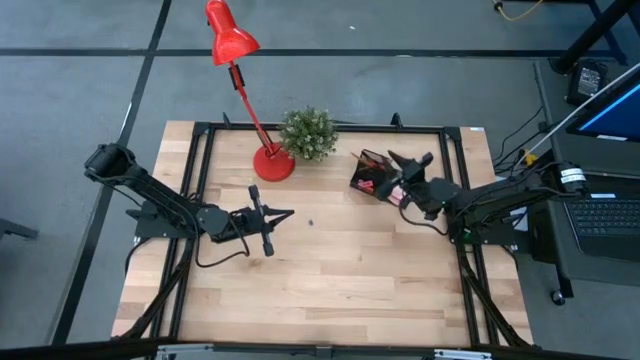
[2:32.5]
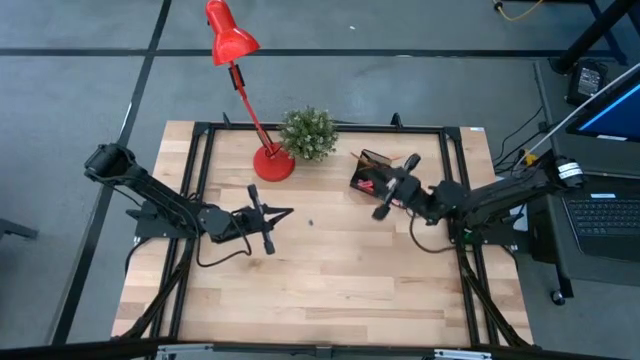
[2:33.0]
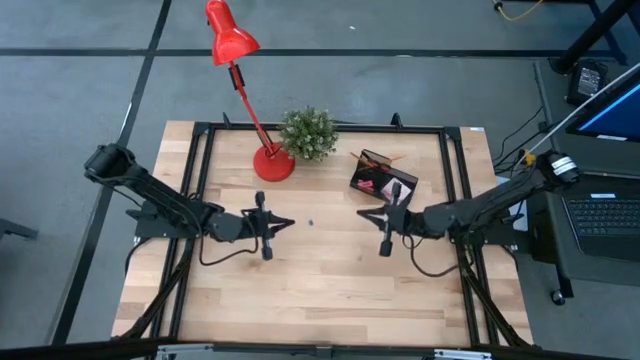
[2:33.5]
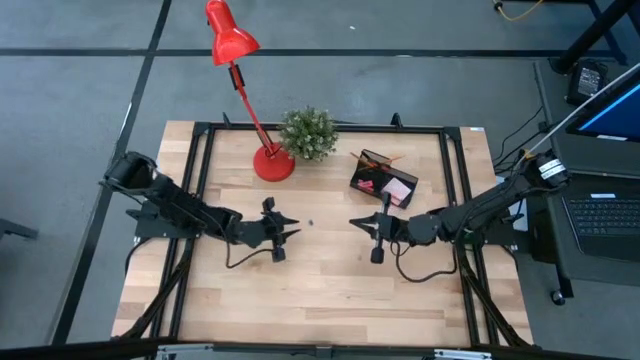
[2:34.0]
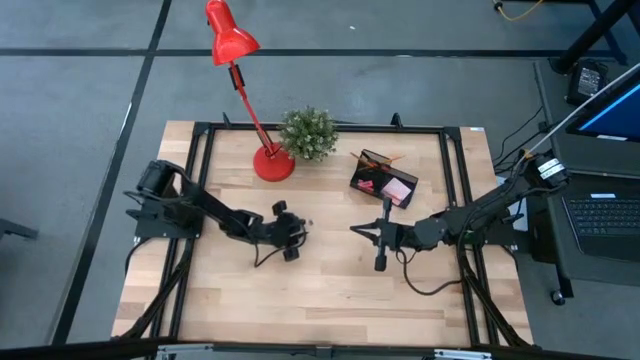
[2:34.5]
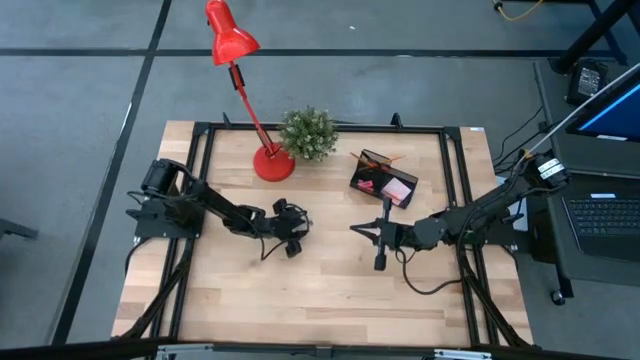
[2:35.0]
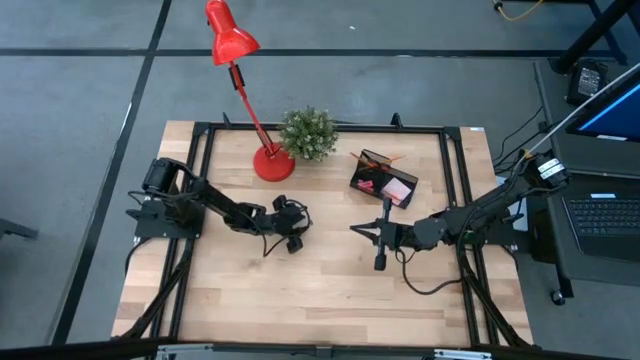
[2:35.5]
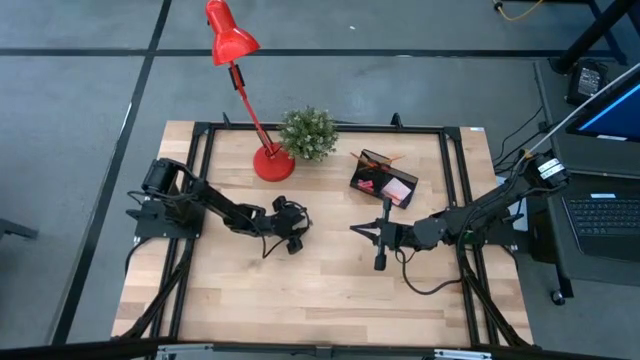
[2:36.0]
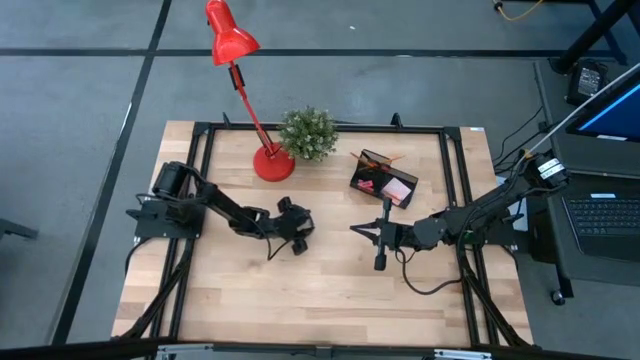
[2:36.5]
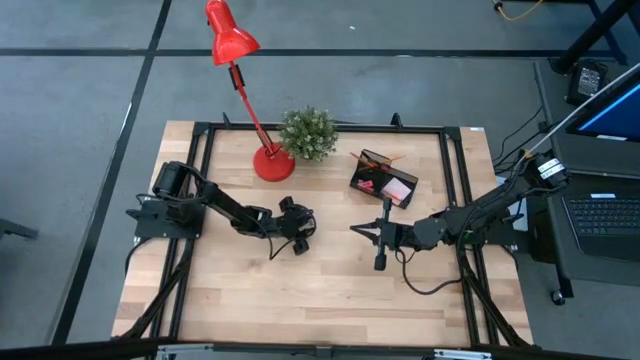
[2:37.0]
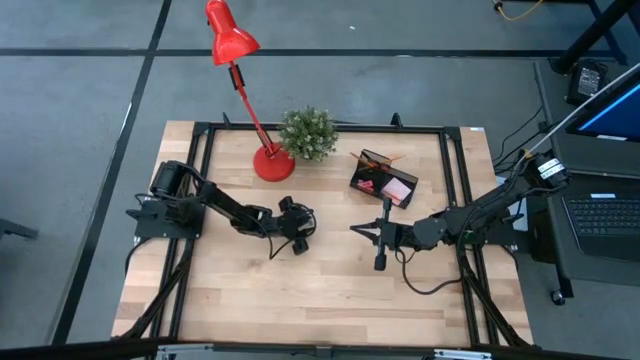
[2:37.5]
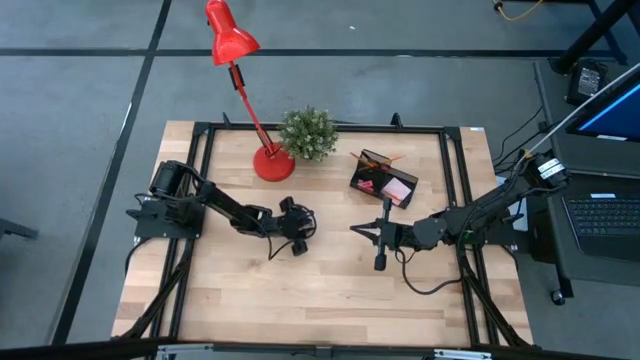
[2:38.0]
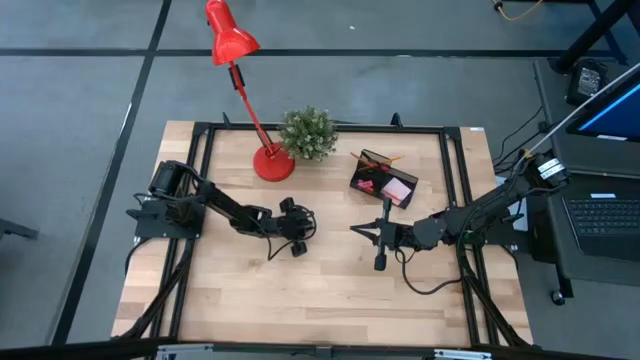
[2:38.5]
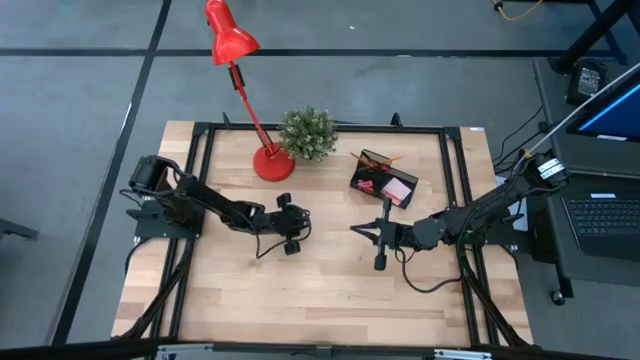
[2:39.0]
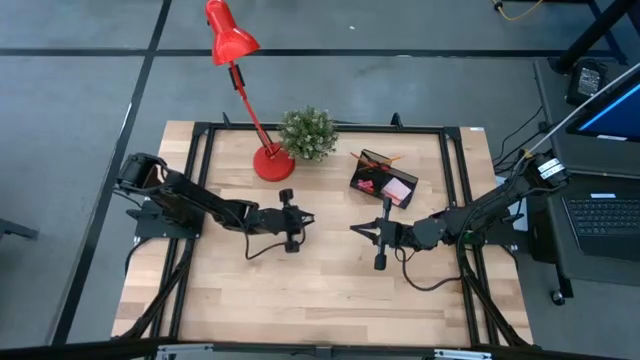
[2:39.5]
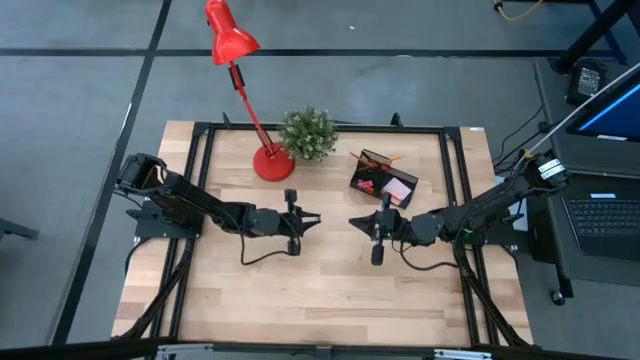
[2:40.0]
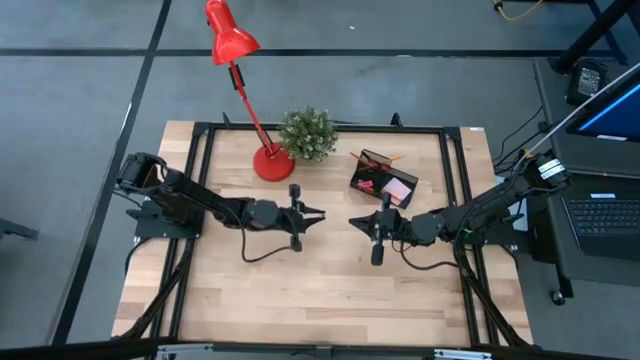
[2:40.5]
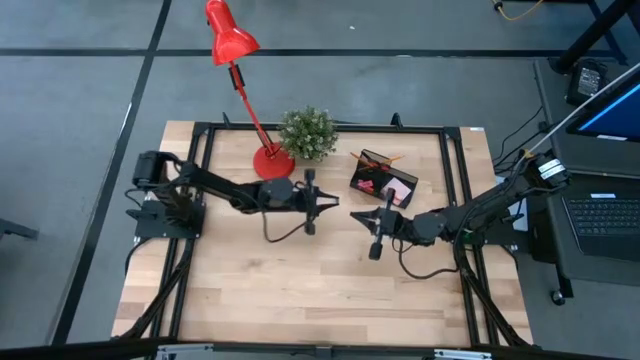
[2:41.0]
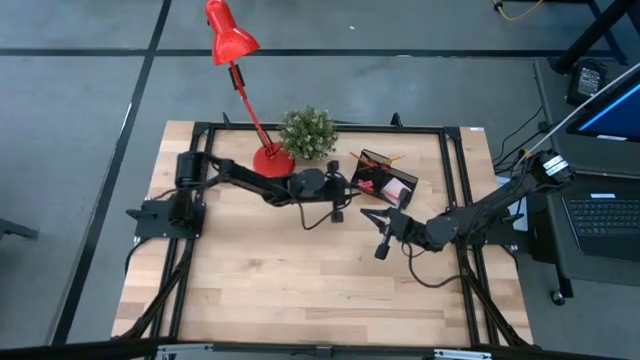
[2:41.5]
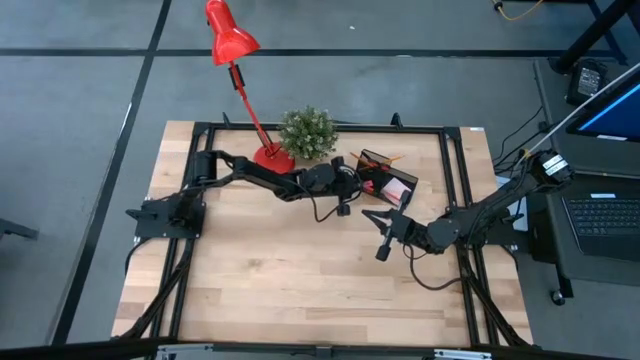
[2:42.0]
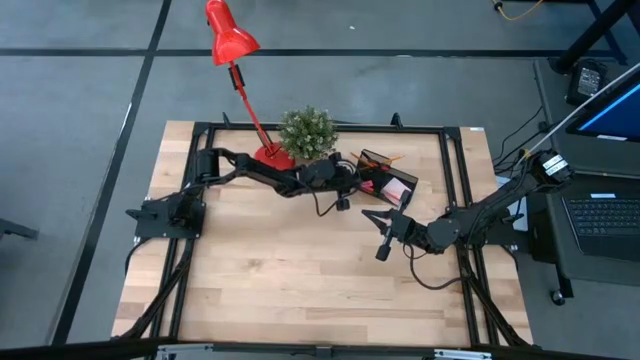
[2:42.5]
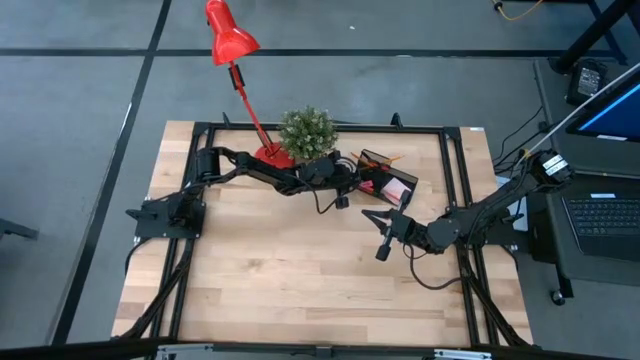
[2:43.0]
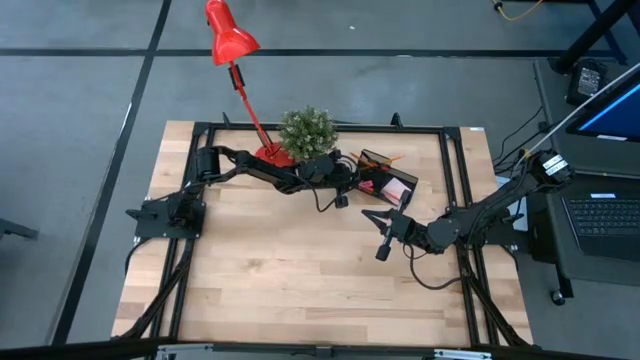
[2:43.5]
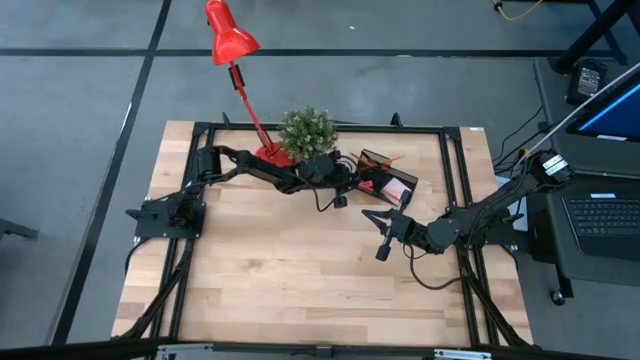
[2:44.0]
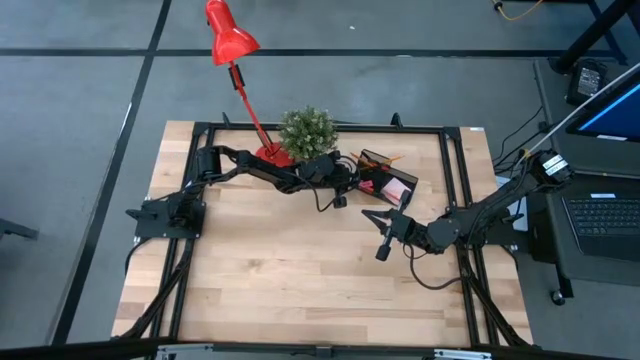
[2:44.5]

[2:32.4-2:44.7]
Task: Pick and place office supplies into organizer
Put the blue binder clip into the black desk organizer

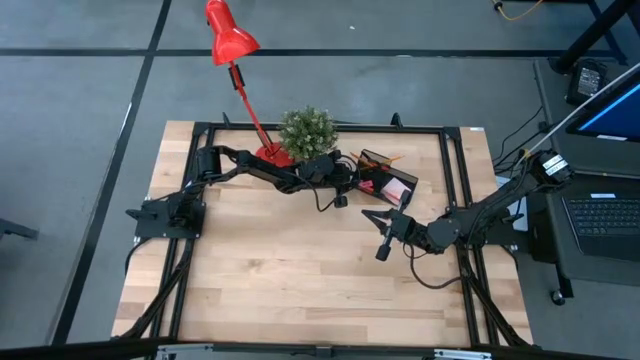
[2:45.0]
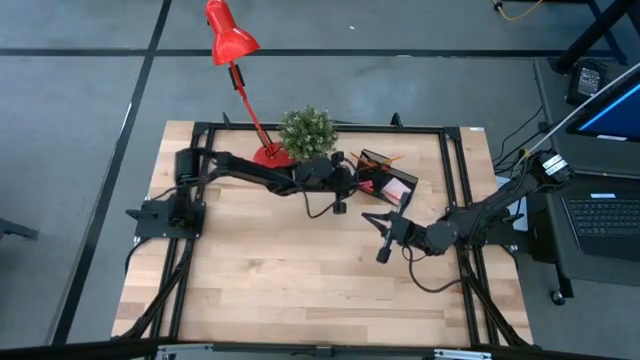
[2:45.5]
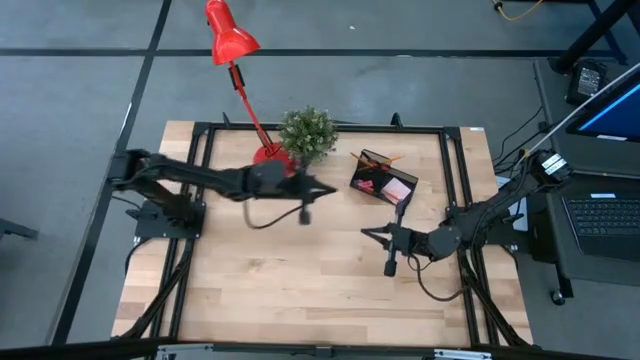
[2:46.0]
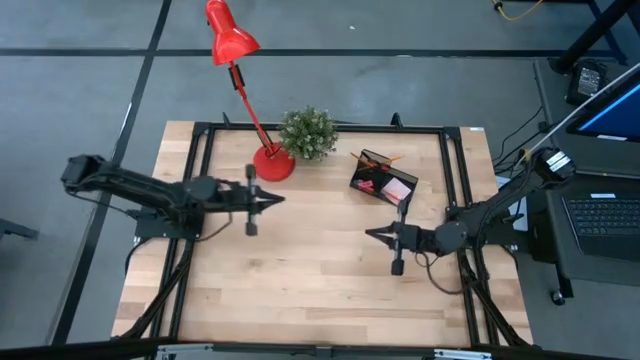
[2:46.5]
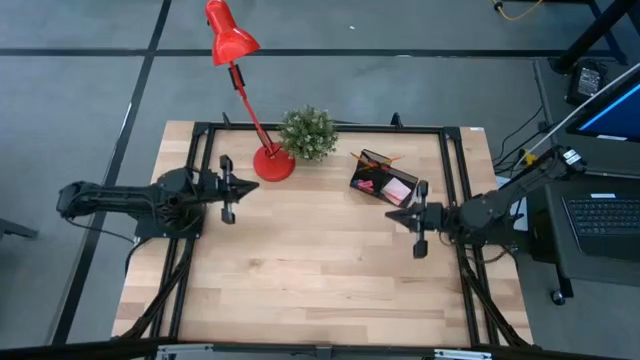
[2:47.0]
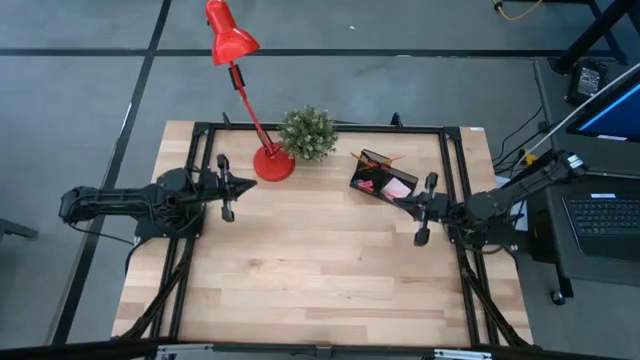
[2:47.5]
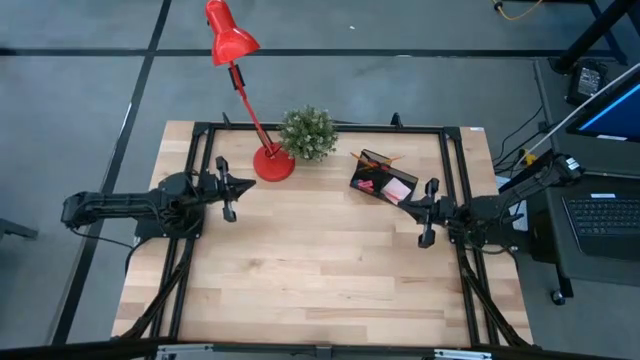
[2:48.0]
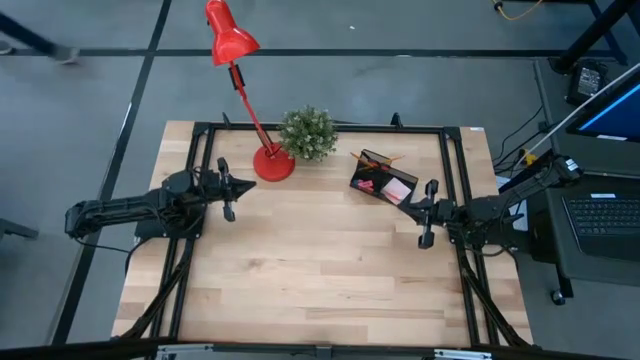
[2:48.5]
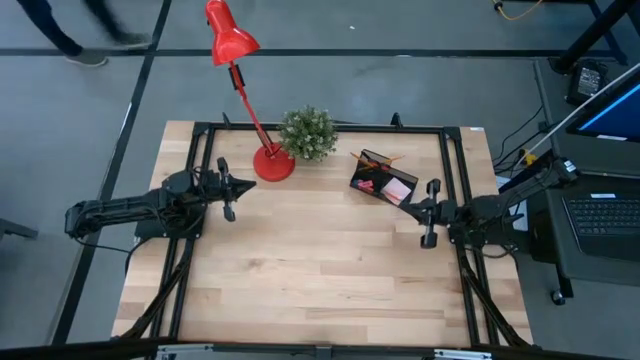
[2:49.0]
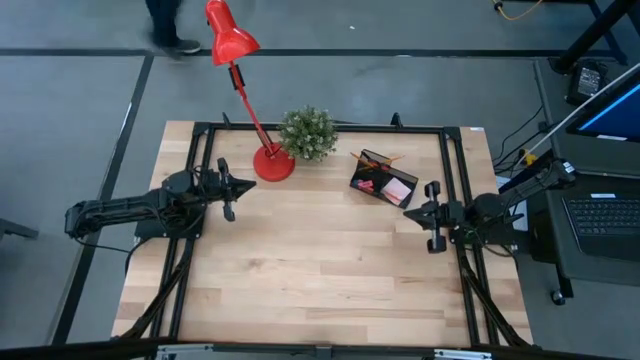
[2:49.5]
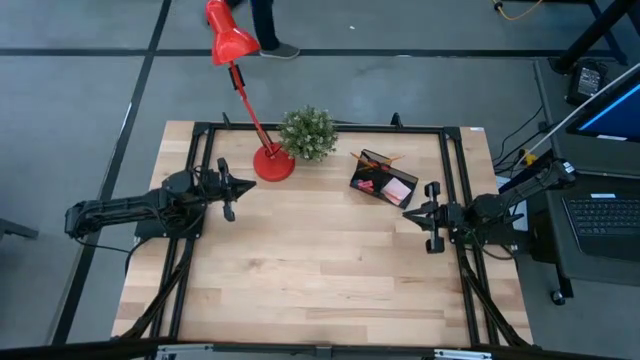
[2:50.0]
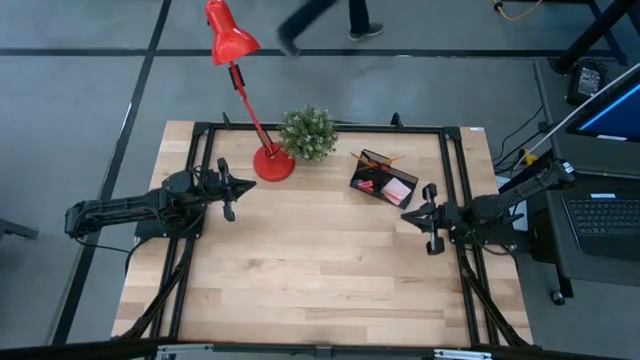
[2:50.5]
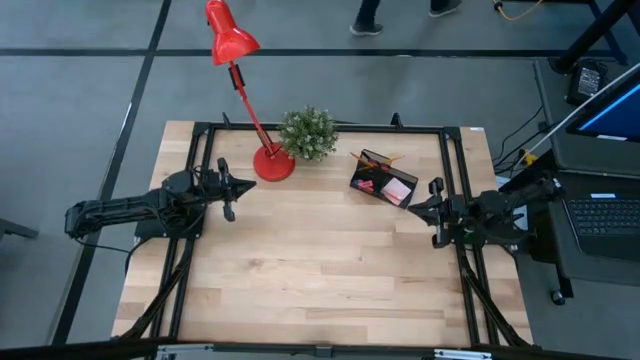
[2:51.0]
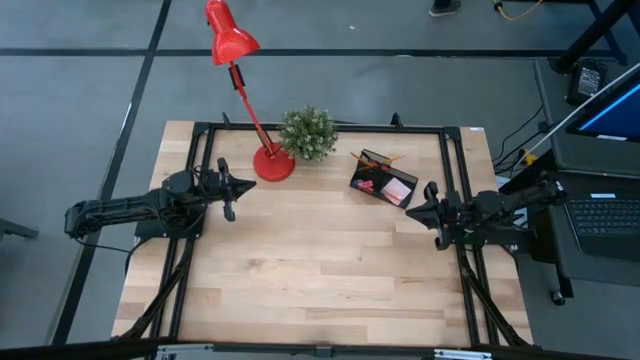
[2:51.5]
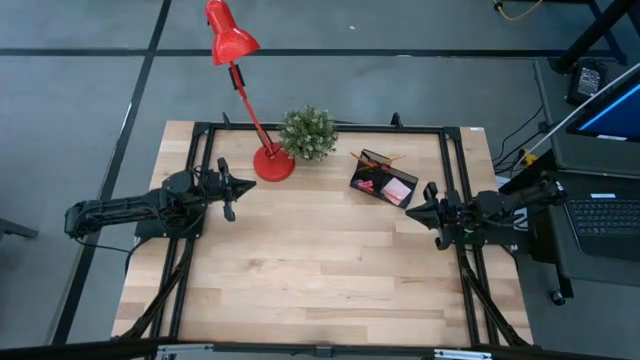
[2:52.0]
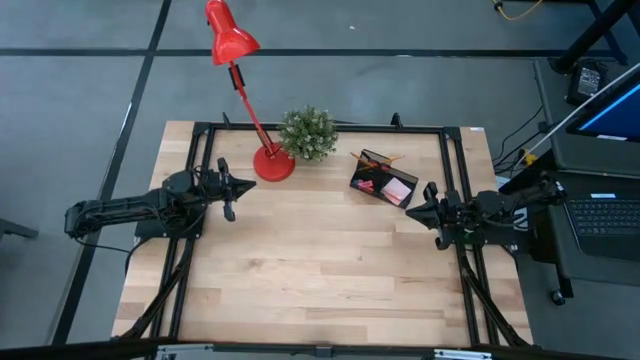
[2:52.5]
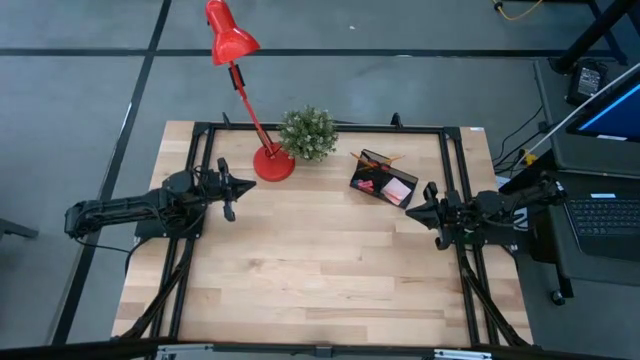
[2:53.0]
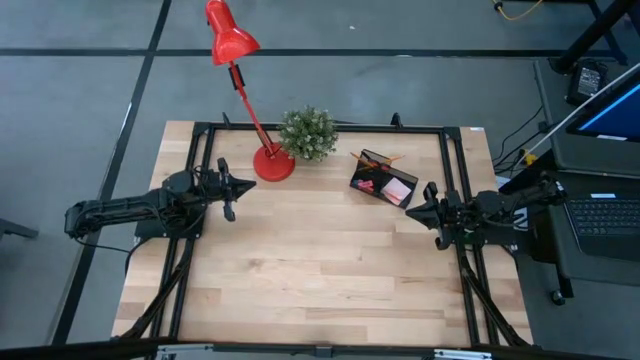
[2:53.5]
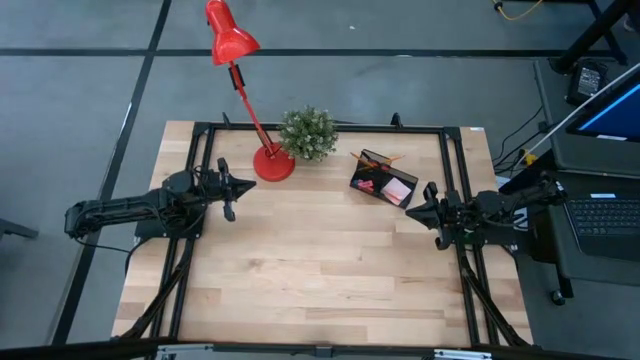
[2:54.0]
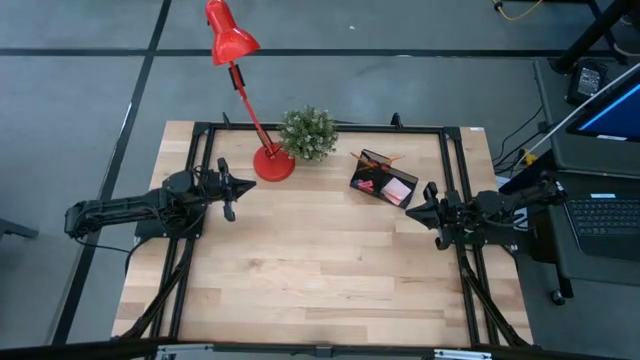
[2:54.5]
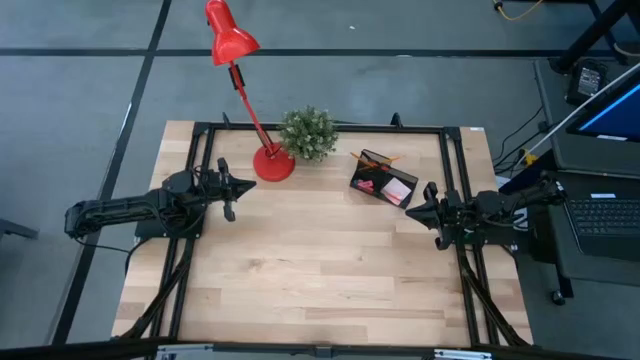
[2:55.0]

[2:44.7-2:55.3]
Return to Home Position
